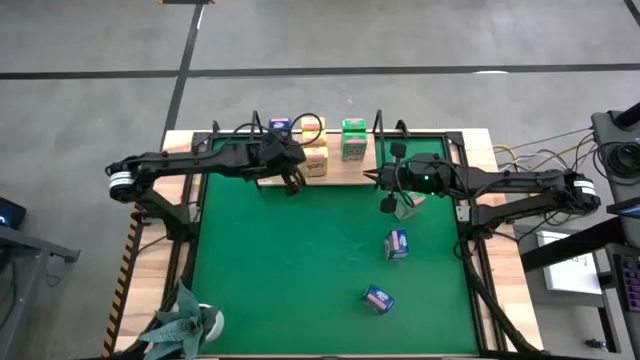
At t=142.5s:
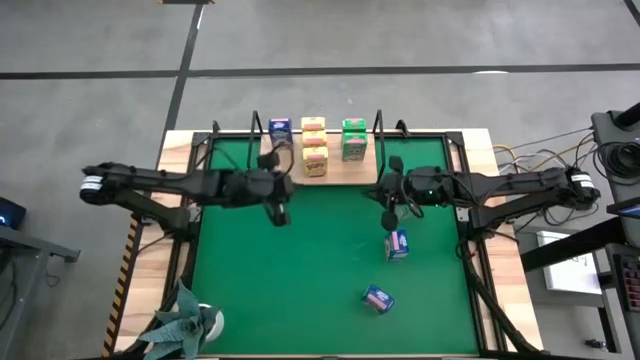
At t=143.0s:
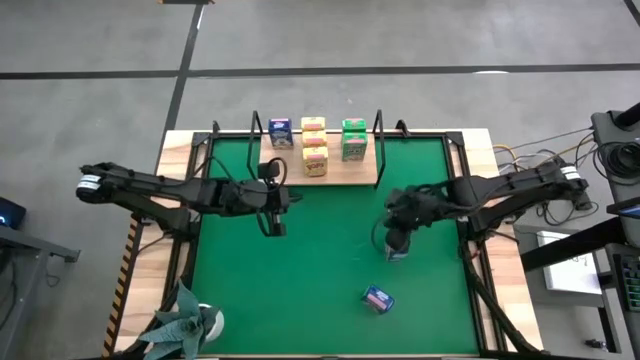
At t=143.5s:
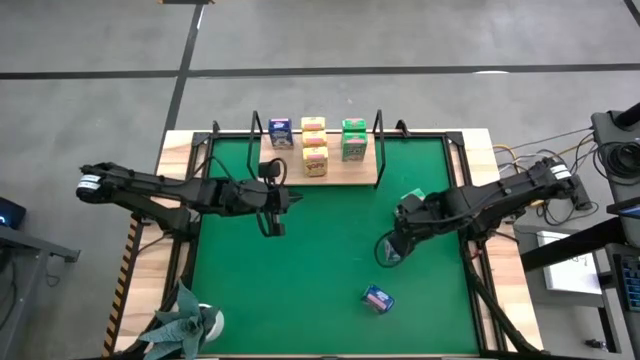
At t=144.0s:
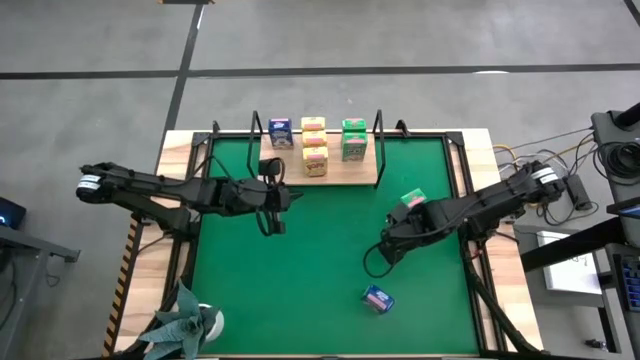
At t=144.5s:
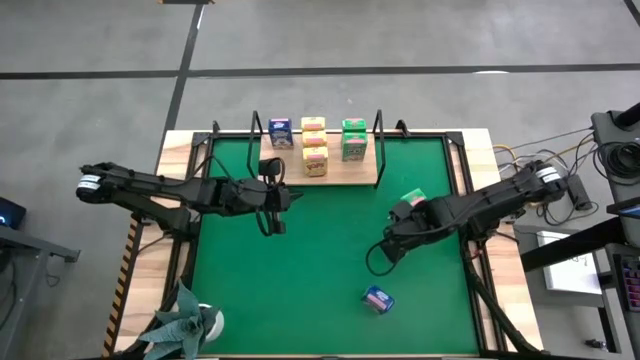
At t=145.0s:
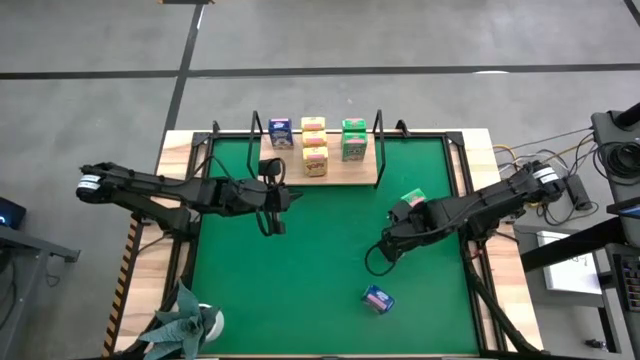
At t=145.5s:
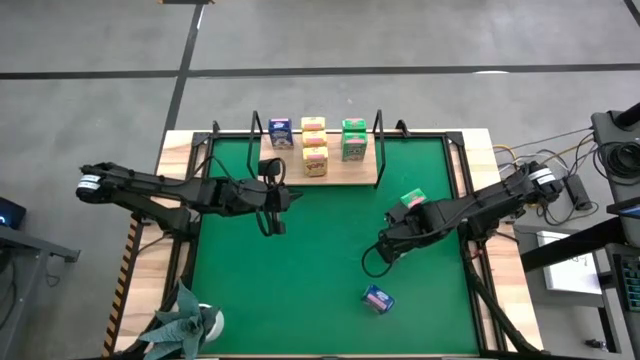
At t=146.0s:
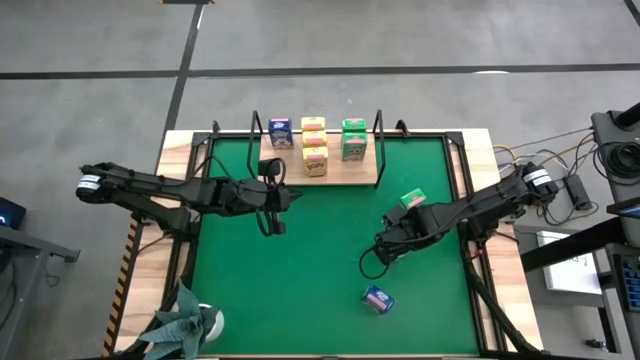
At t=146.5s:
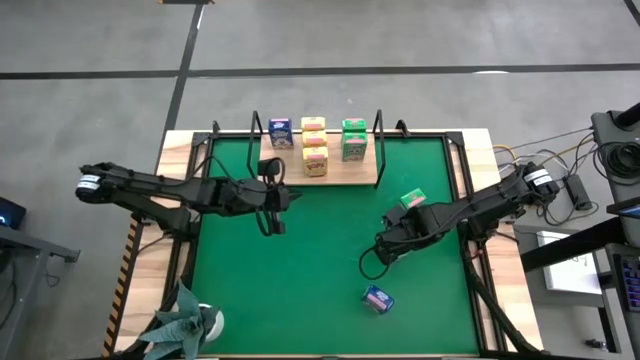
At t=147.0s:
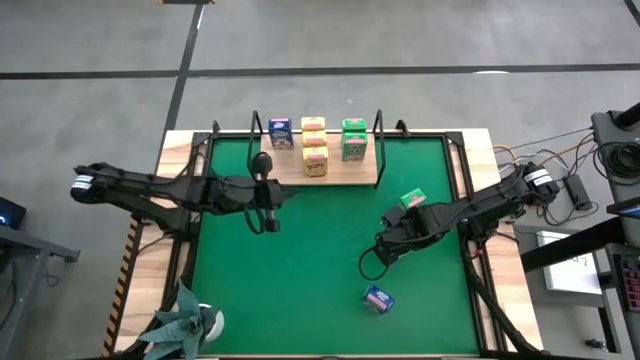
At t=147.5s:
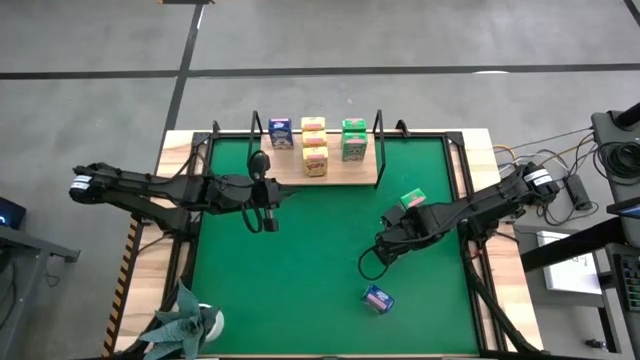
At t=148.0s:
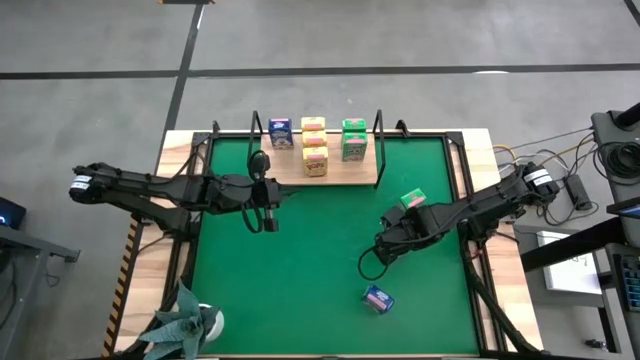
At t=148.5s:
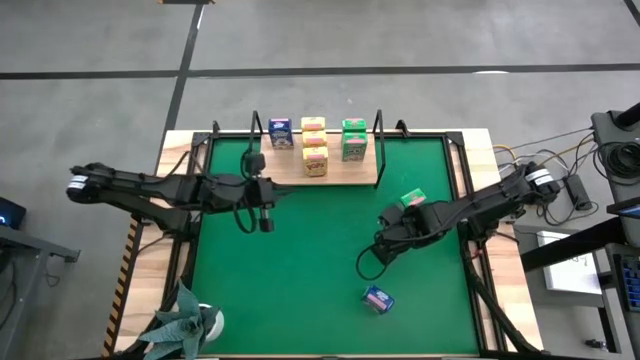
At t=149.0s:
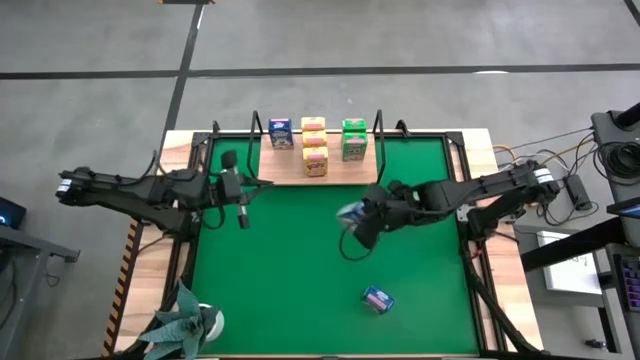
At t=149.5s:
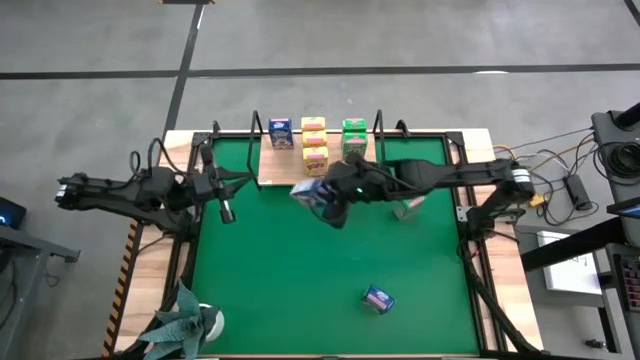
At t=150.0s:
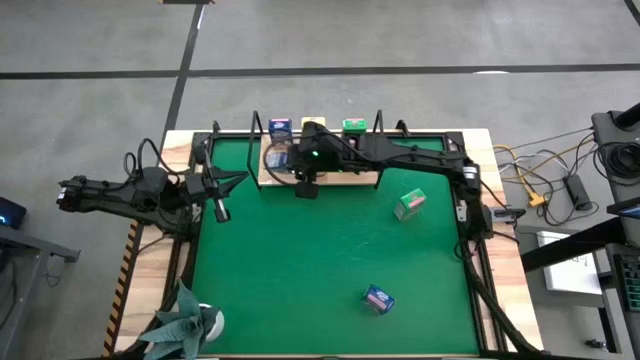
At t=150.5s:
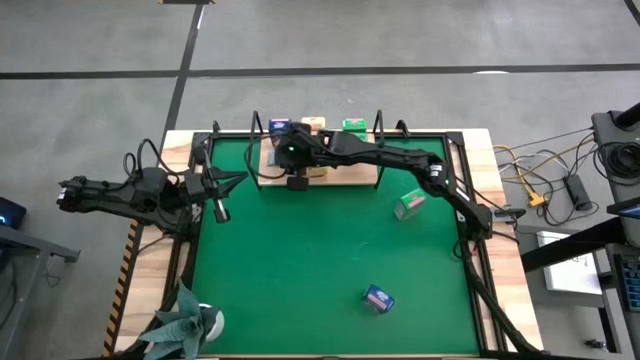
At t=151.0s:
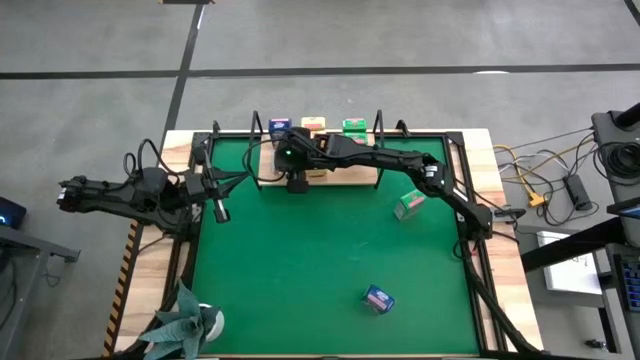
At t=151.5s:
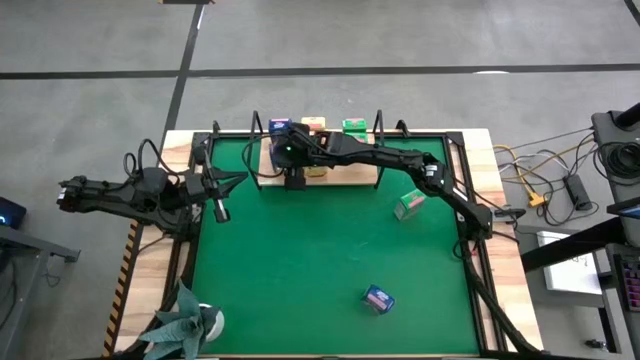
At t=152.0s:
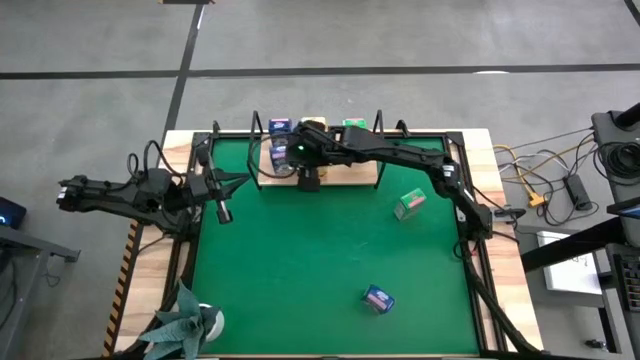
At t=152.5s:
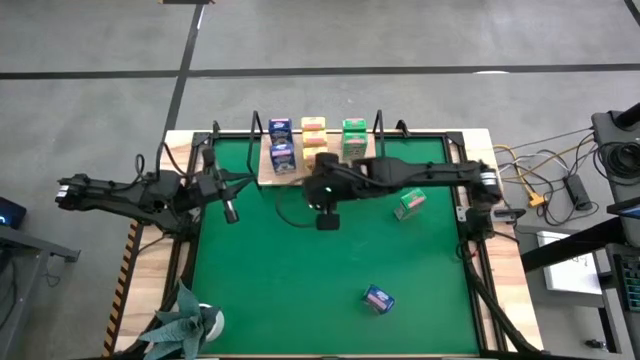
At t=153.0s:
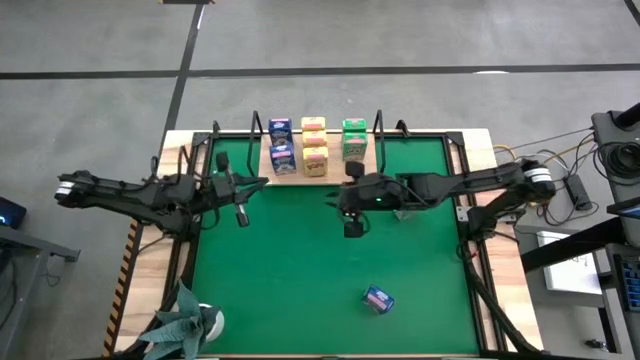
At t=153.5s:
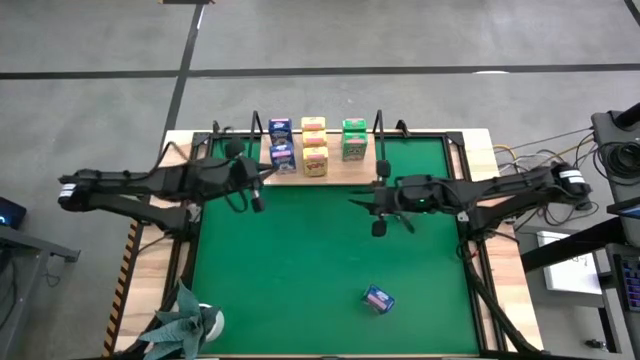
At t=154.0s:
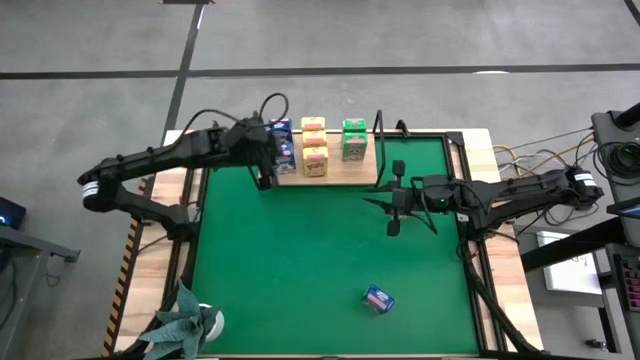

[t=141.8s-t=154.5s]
Task: Stack cereal on shelf
Put the top blue cereal box on the shelf aligned with the other blue cereal box

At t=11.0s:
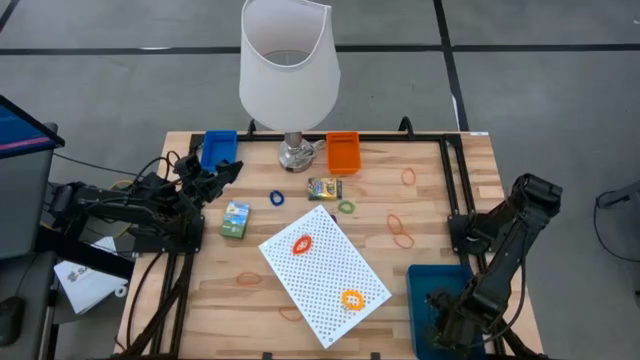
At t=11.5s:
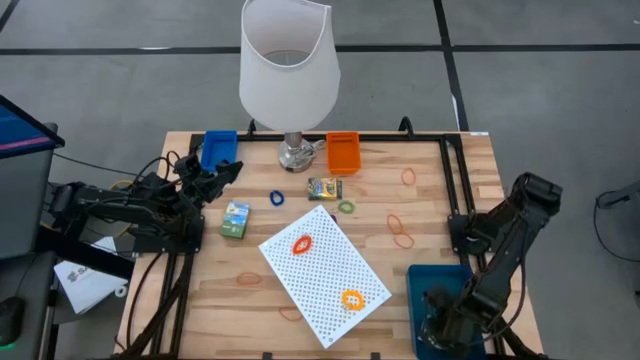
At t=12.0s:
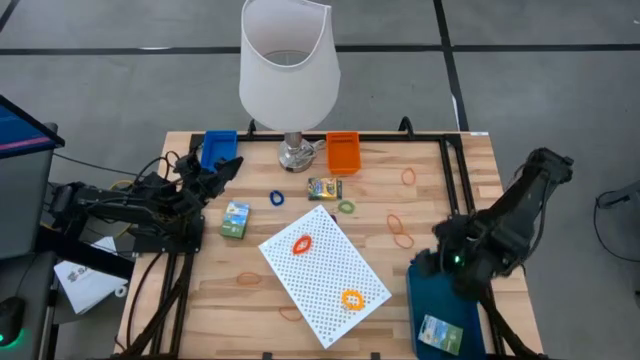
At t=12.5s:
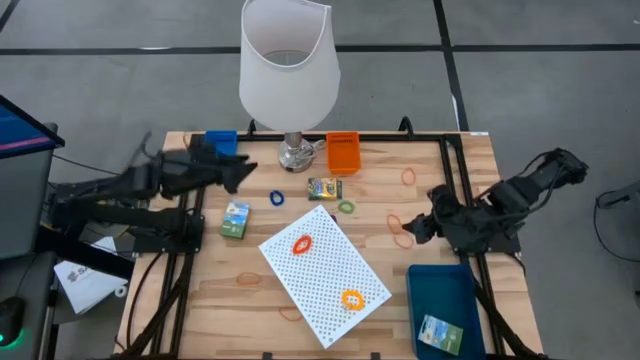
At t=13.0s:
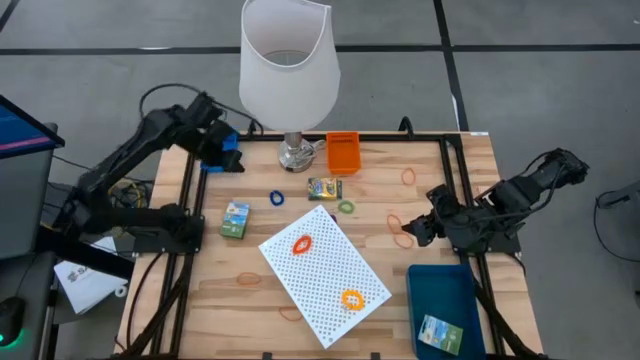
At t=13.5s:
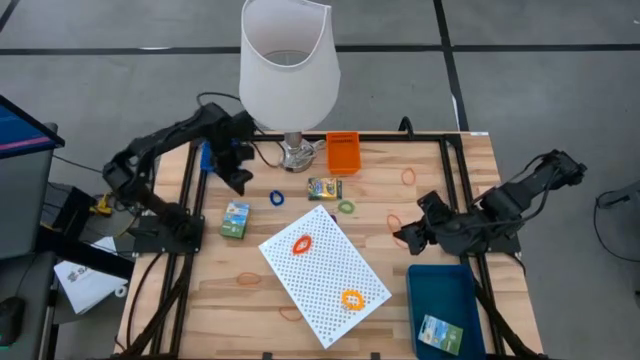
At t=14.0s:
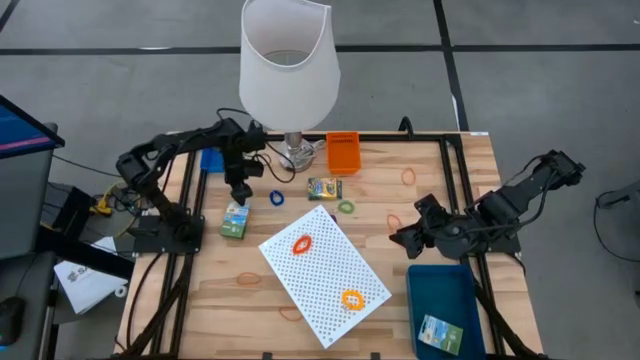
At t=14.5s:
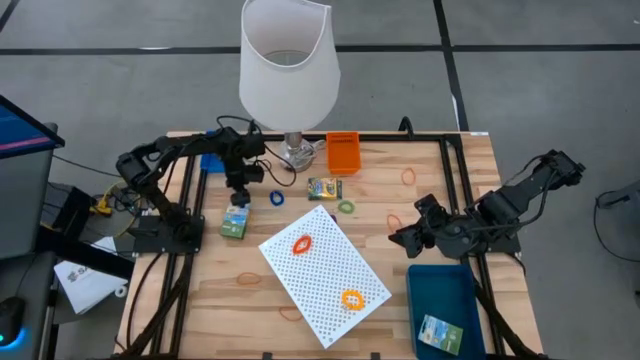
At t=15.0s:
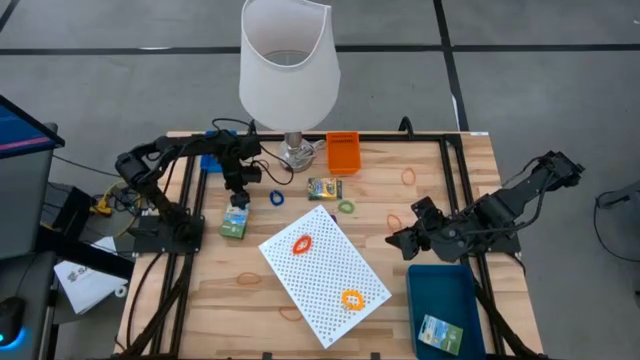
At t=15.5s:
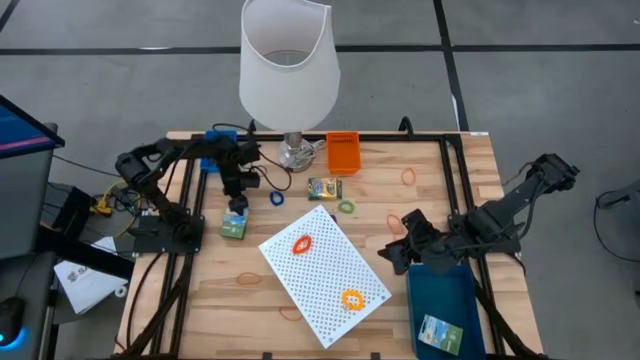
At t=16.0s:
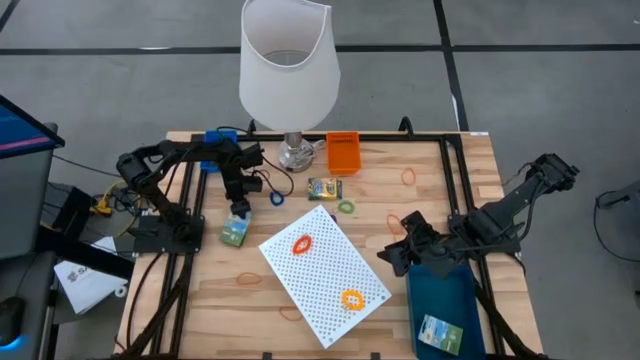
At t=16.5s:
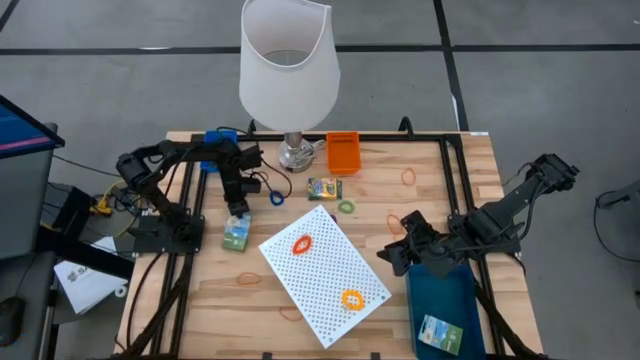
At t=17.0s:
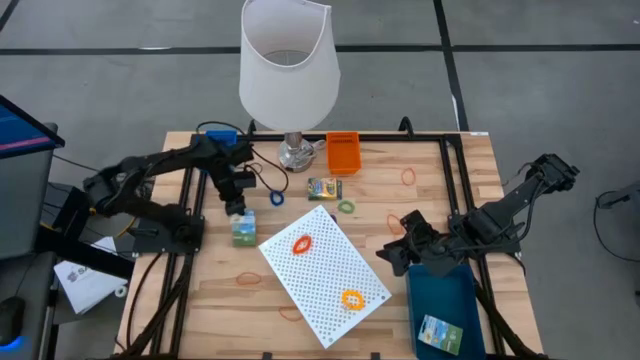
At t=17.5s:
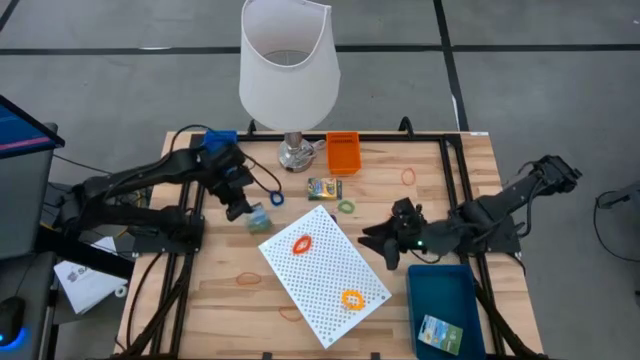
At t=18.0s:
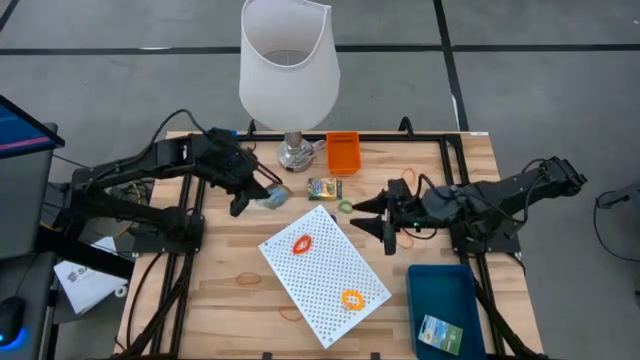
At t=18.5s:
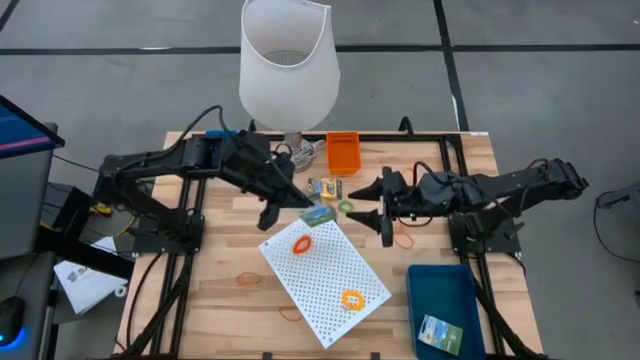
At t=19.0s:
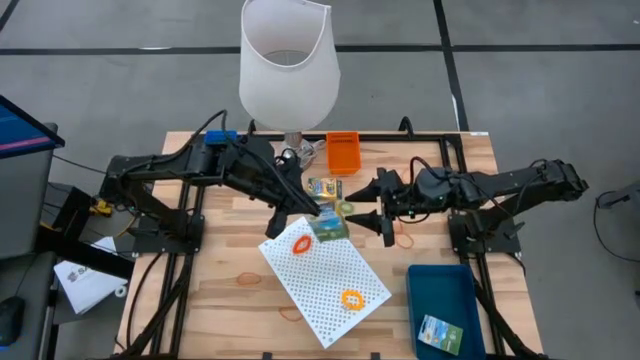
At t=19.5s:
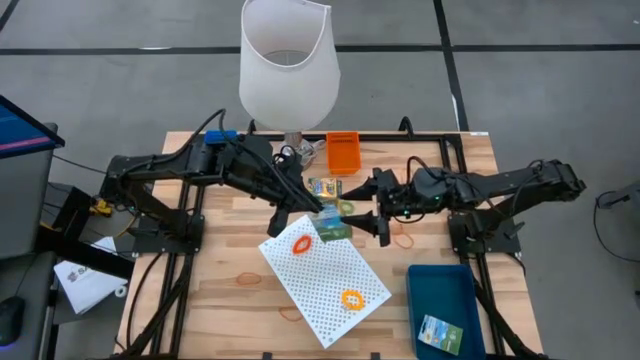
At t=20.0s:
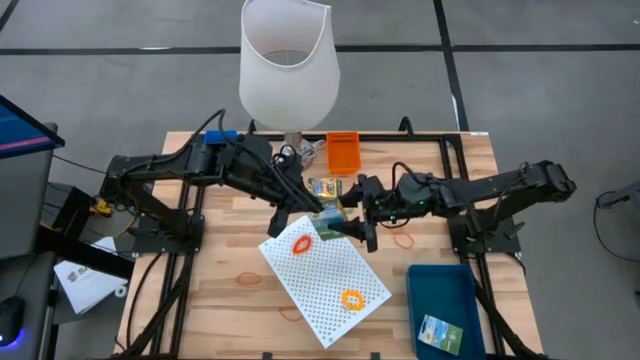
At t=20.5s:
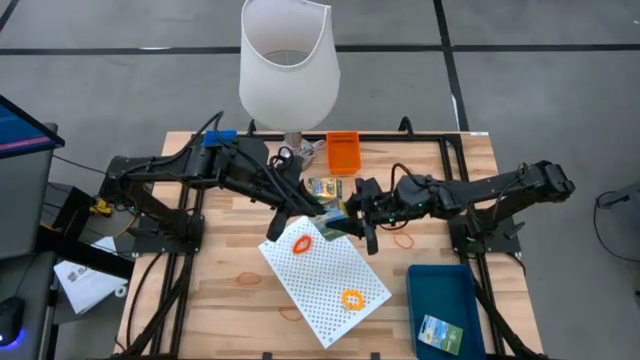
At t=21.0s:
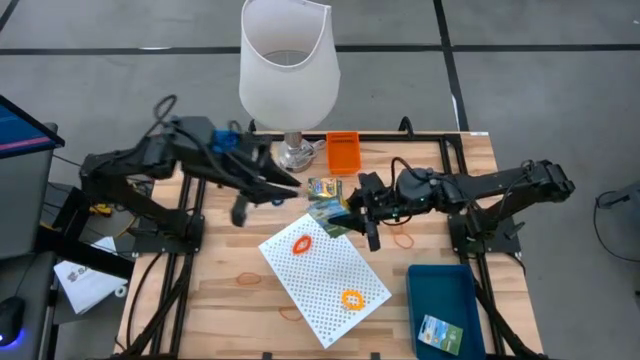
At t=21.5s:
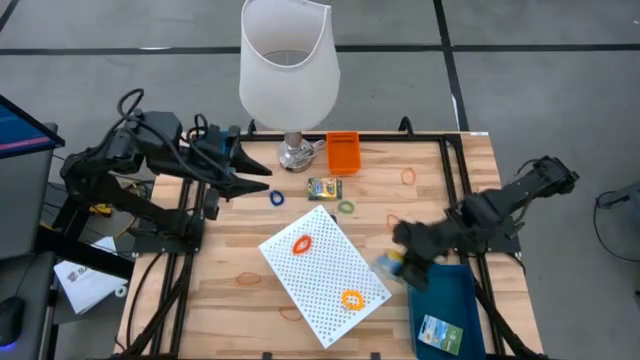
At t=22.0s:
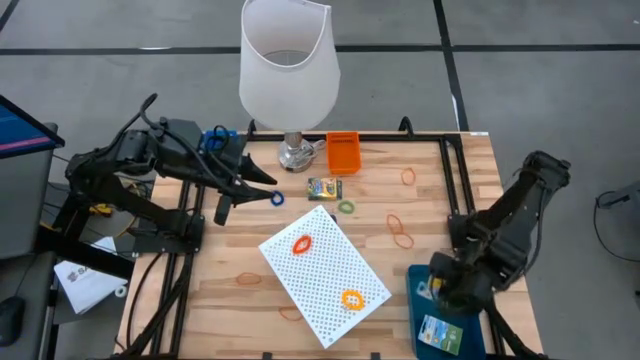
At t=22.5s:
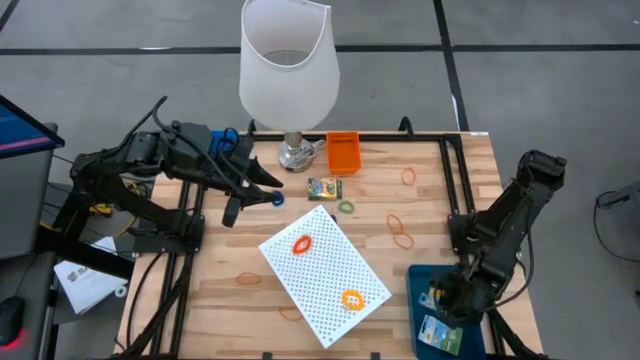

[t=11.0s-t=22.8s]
Task: Pick & Place Office Desk Supplies
Put the crayon box into the blue bin
